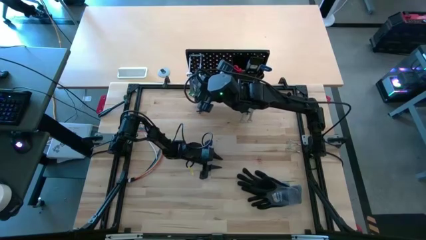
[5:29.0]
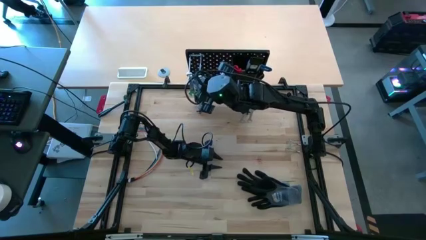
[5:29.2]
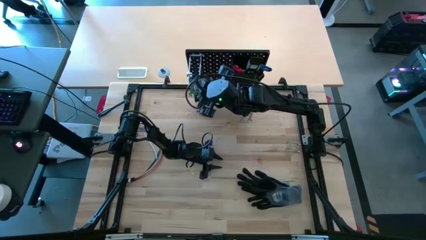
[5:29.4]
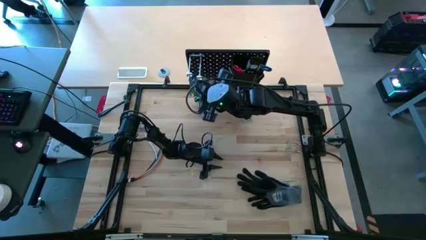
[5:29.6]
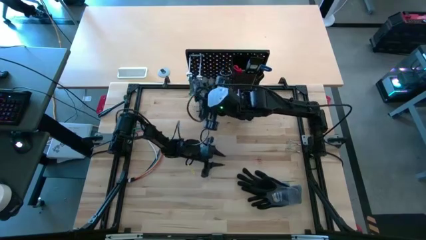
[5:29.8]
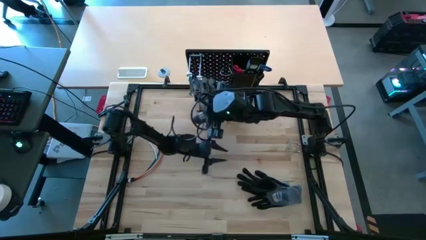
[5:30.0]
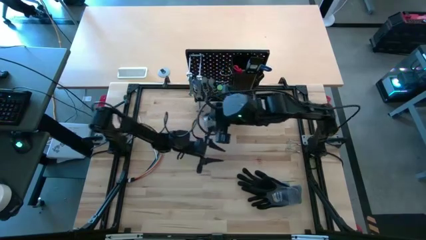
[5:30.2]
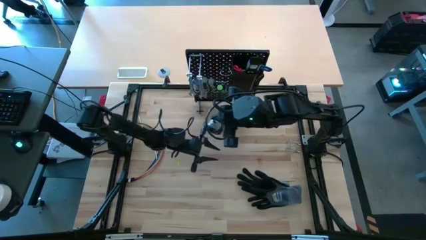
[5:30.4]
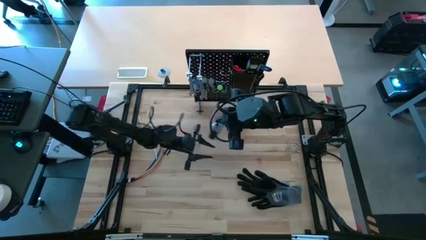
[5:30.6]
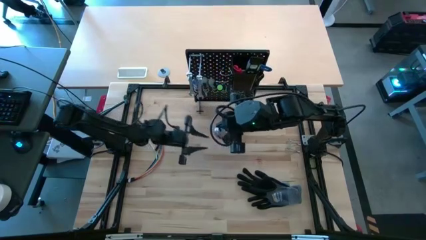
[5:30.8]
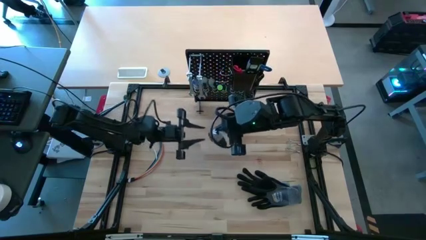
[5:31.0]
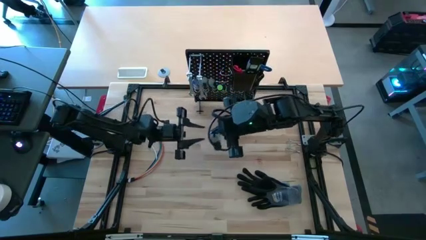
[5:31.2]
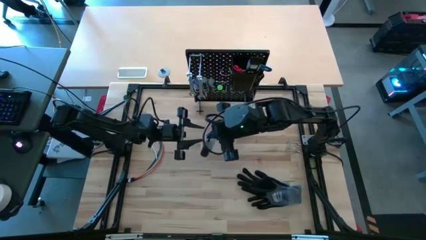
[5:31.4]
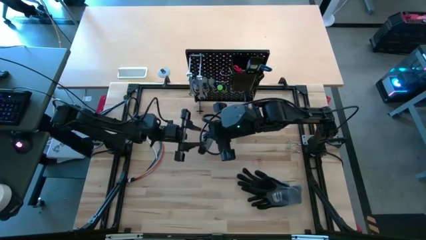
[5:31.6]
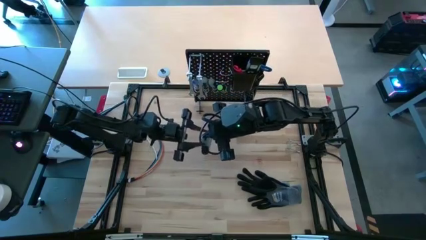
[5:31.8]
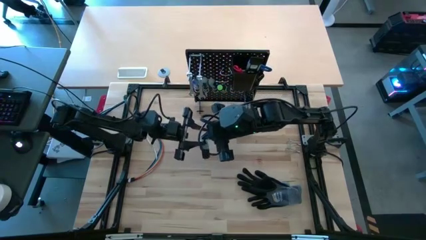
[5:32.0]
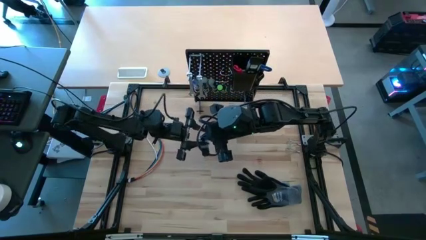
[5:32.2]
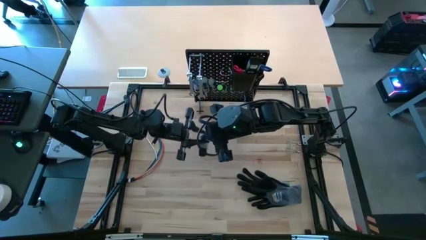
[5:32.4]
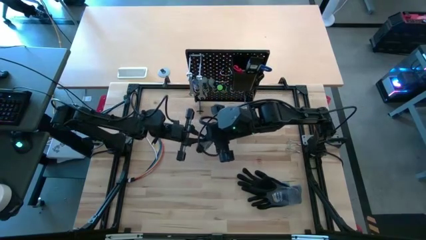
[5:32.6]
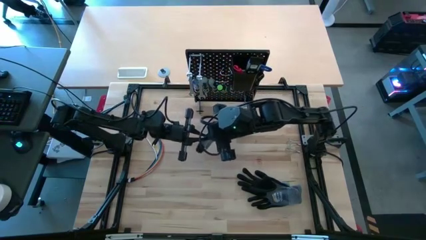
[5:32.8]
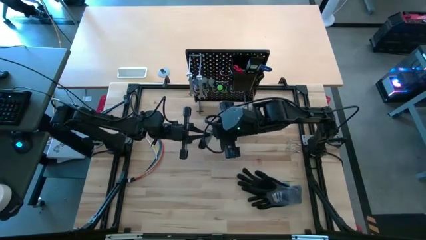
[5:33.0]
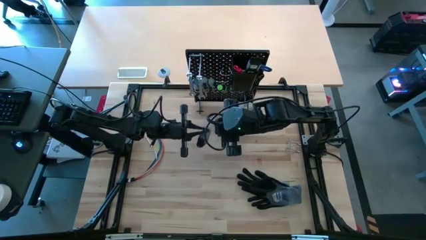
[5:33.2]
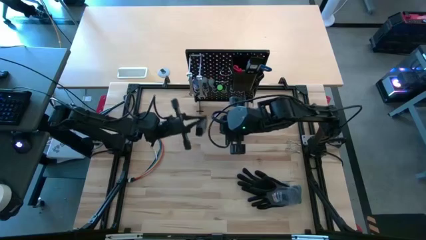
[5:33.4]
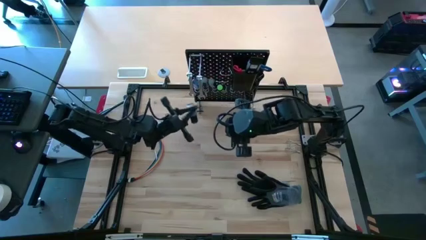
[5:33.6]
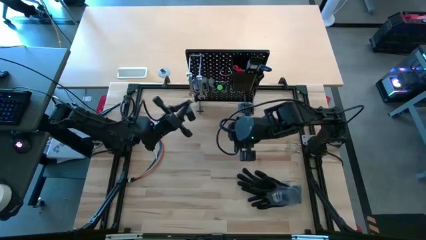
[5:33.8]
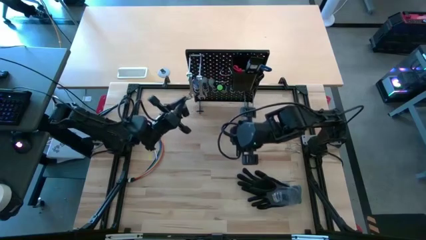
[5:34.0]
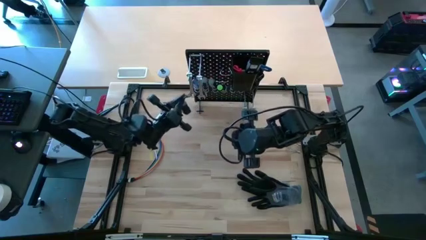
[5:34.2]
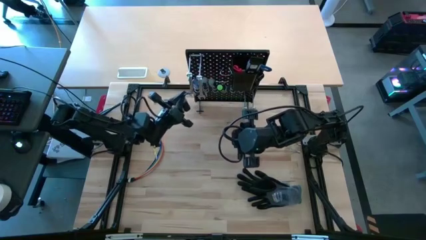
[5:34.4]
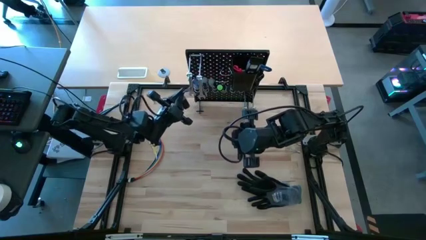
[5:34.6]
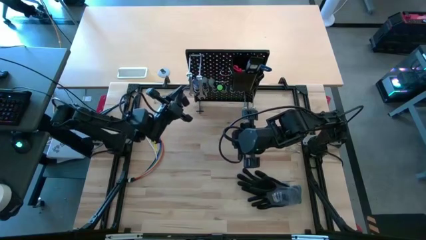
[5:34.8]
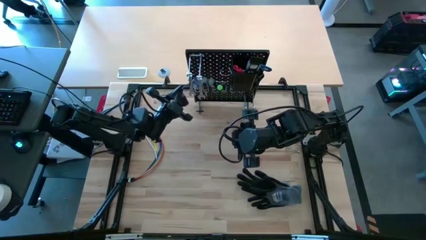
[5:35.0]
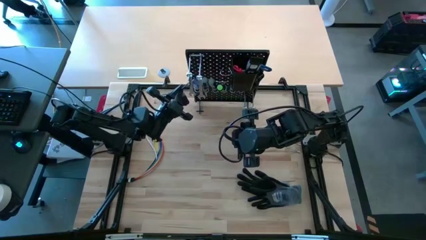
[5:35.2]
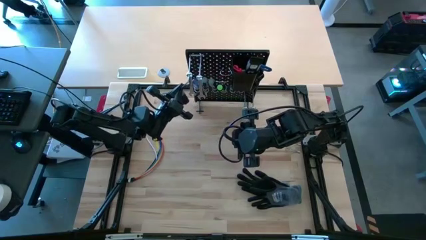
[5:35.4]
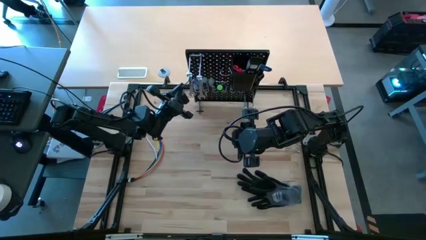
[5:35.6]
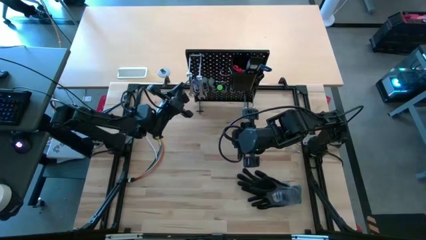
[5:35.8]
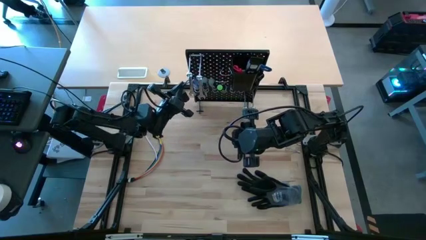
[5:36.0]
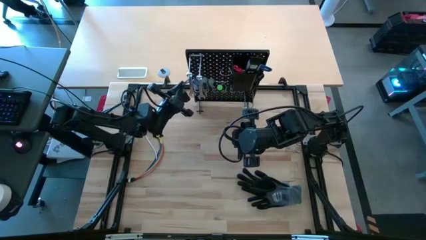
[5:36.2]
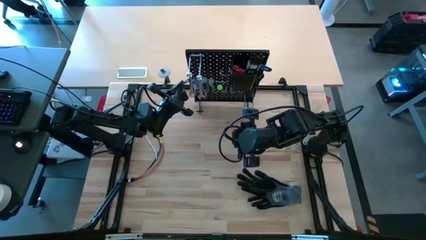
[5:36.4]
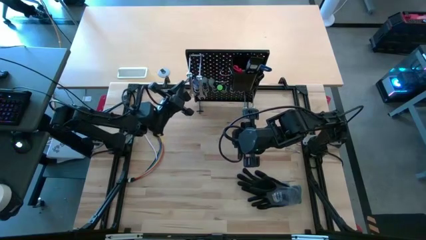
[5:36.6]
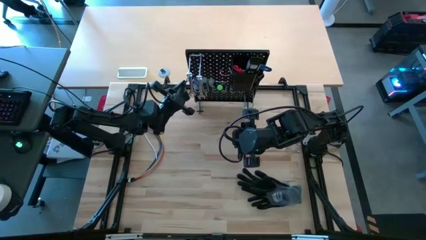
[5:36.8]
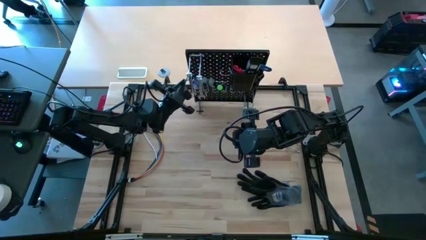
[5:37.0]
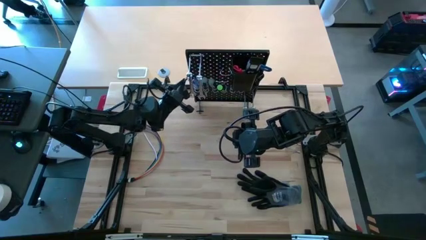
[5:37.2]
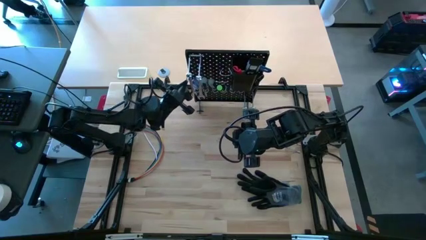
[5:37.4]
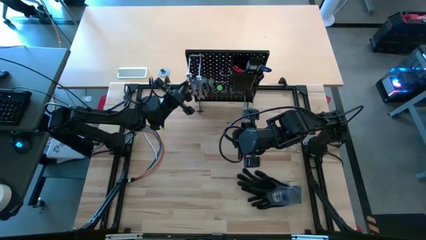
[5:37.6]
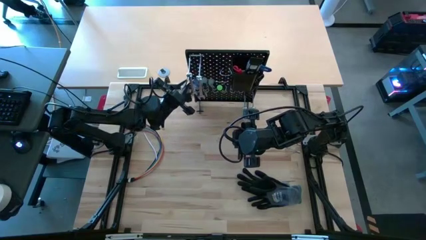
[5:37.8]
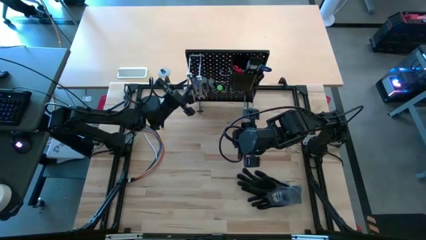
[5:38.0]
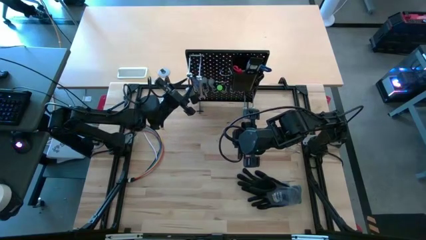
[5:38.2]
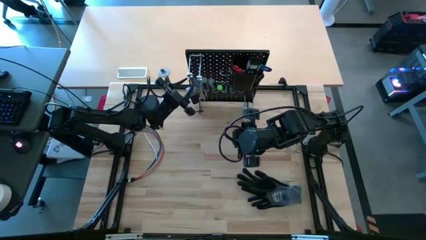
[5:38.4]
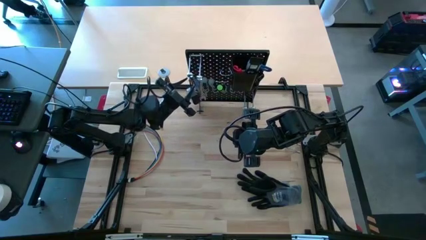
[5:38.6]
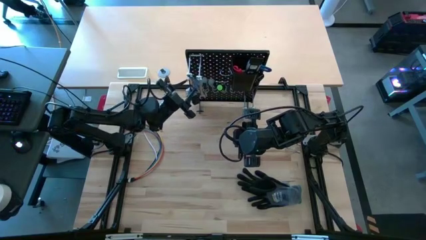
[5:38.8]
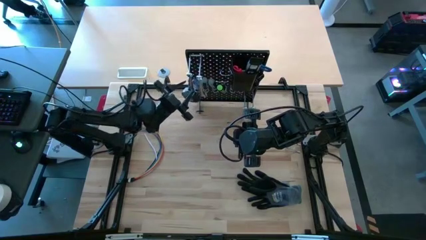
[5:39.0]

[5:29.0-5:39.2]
Task: Hang tools onto peg board
Hang the gray tape measure on the peg board

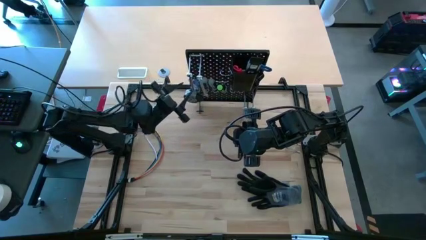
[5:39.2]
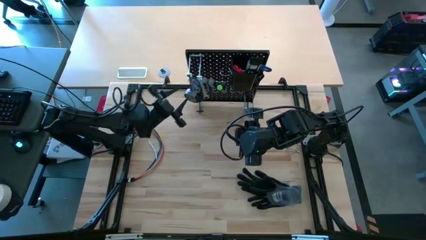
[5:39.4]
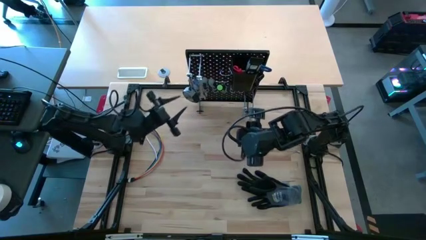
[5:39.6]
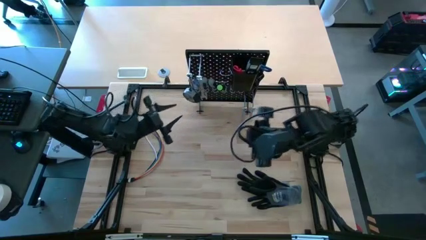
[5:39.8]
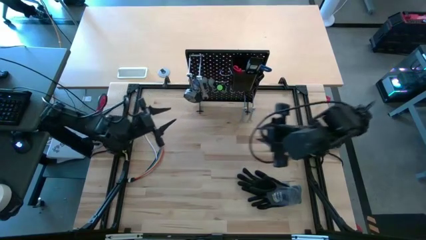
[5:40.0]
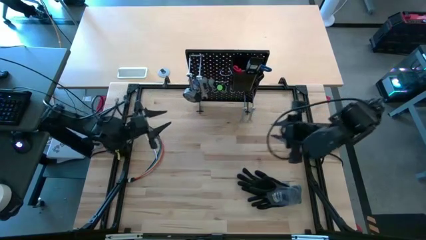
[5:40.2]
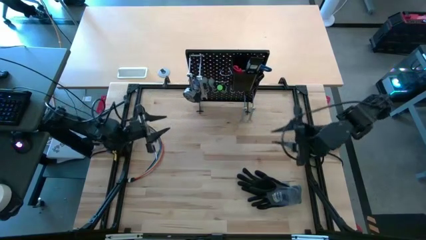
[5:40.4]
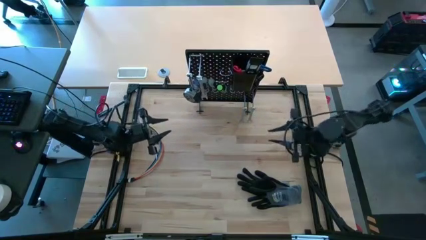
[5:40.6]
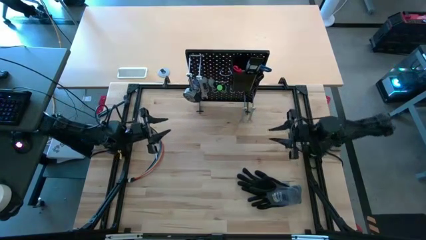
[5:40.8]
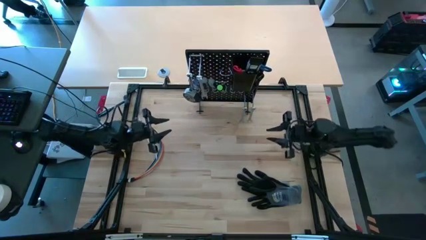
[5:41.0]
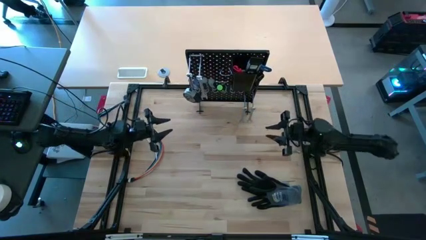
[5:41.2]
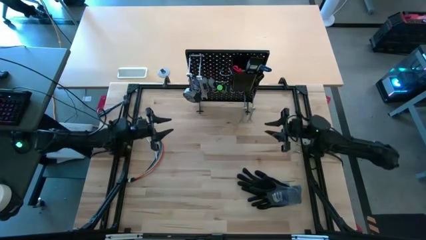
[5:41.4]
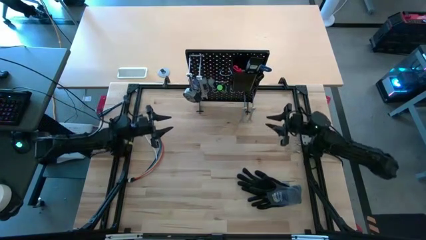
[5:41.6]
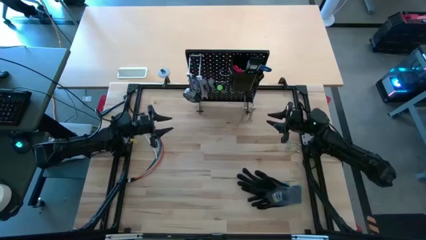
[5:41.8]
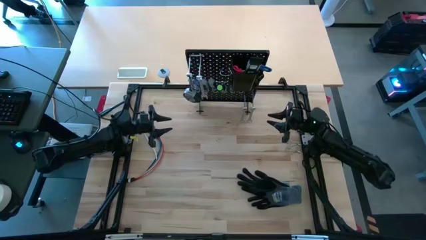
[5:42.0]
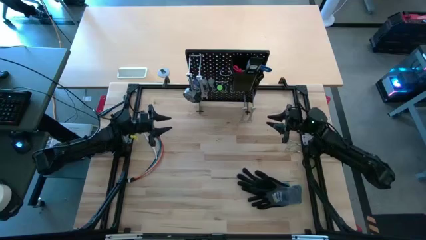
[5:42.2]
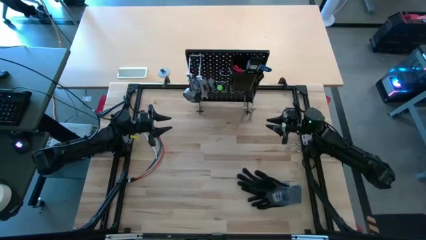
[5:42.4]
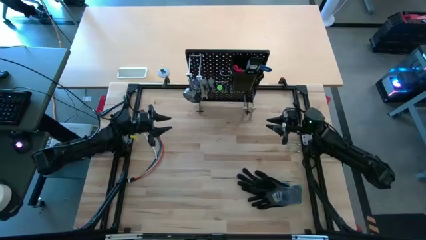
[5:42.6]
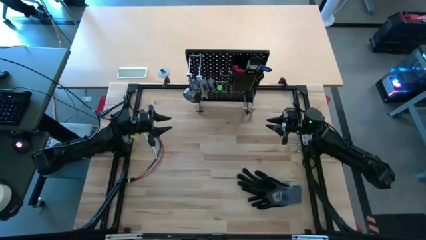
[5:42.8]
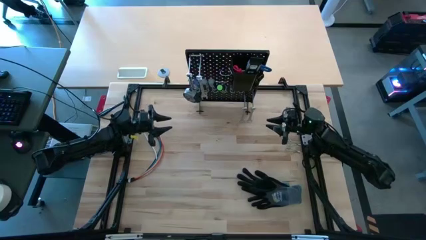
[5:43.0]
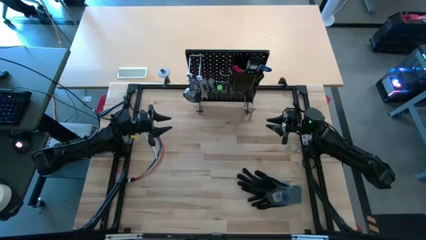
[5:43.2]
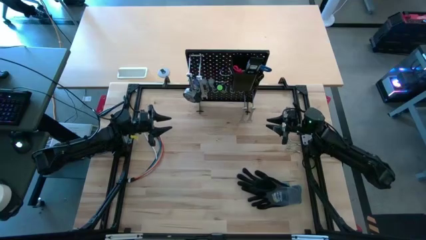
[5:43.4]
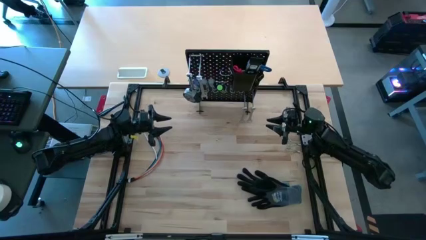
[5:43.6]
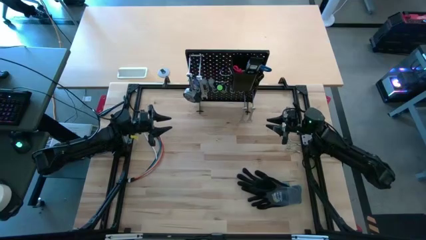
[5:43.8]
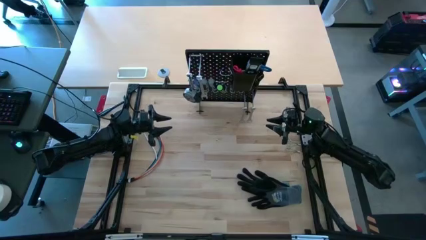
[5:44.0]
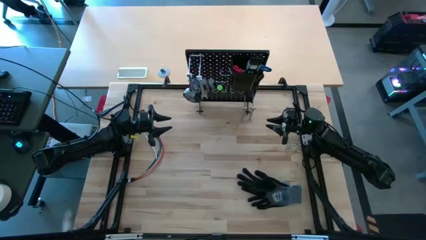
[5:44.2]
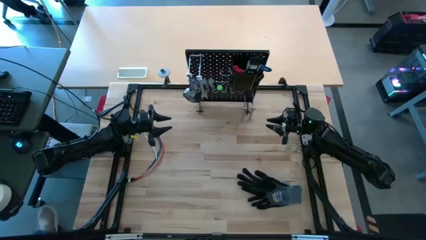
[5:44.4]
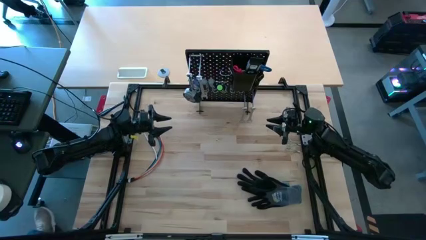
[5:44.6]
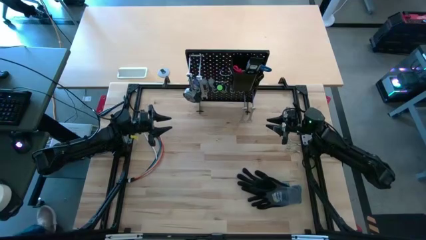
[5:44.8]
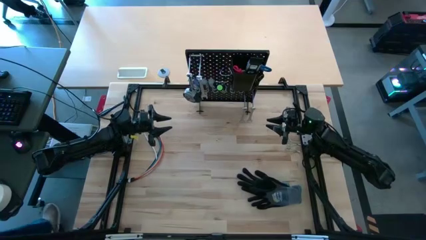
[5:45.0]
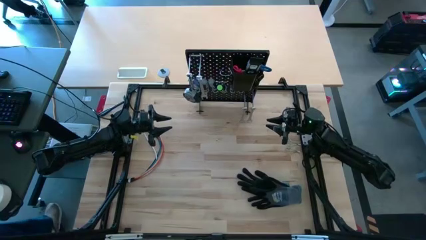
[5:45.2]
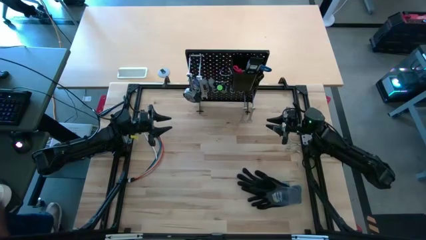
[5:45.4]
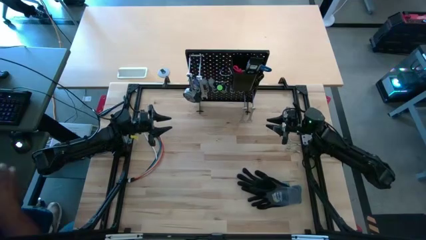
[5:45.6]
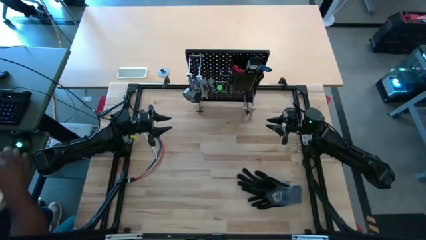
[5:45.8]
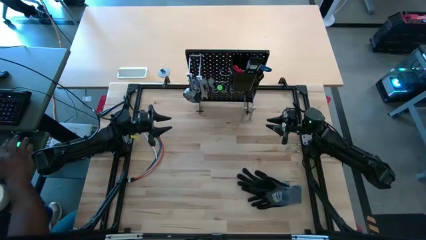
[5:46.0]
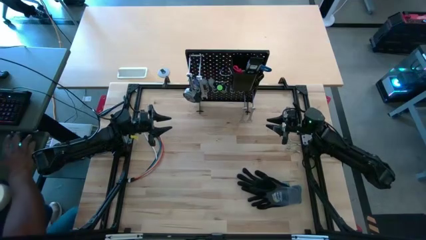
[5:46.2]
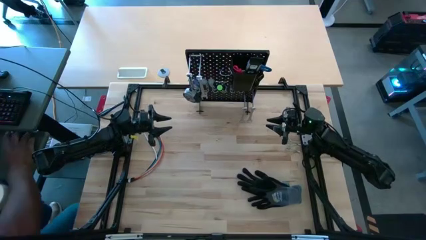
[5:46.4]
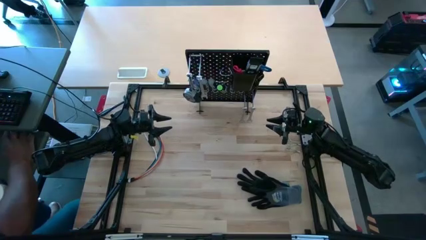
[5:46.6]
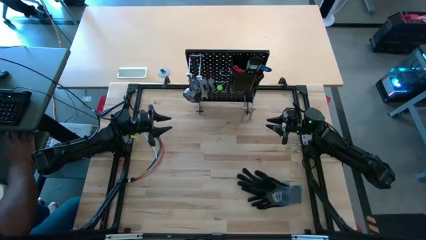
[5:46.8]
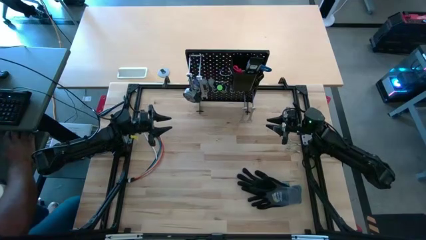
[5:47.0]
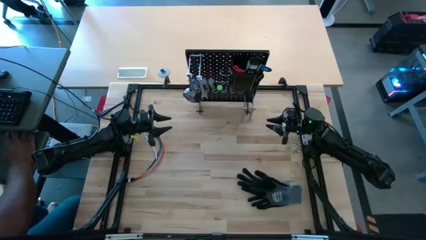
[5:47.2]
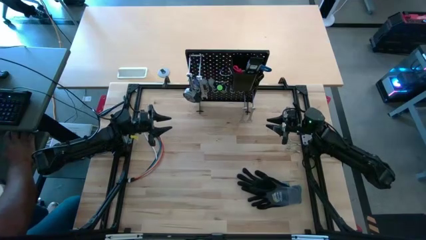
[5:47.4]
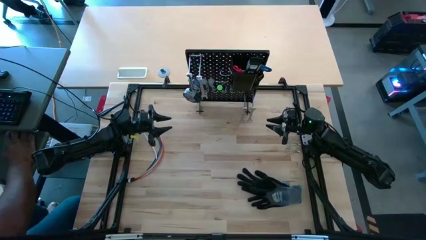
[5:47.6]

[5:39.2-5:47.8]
Return to Home Position
